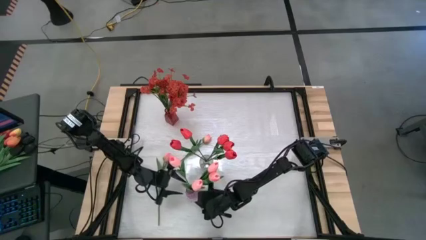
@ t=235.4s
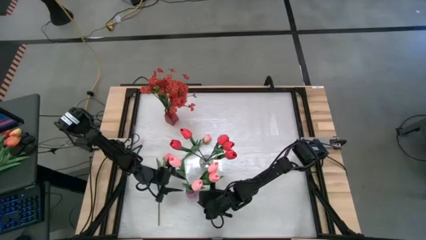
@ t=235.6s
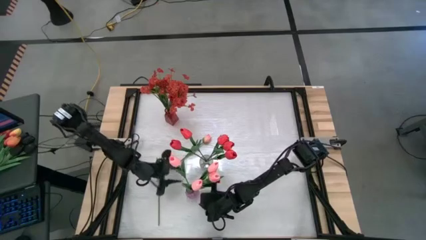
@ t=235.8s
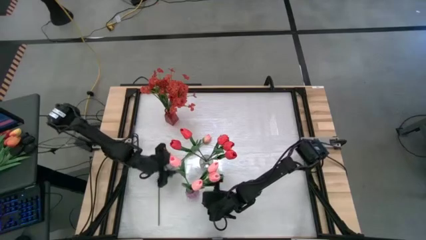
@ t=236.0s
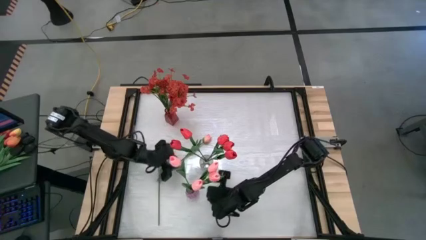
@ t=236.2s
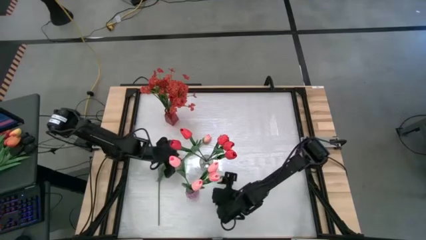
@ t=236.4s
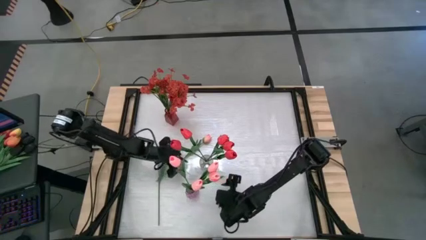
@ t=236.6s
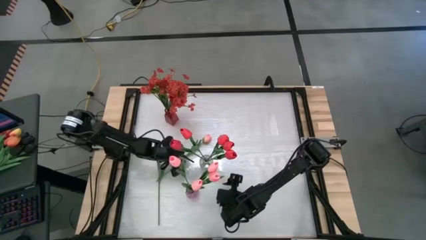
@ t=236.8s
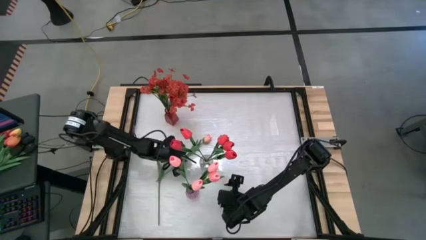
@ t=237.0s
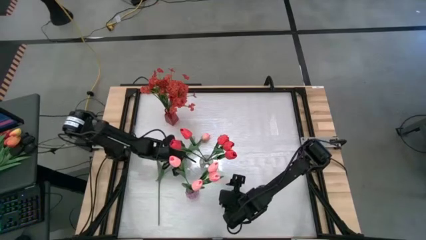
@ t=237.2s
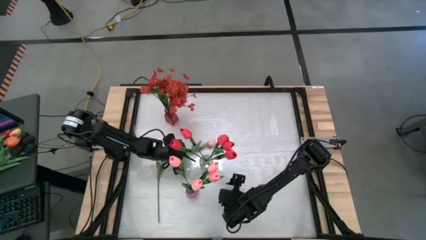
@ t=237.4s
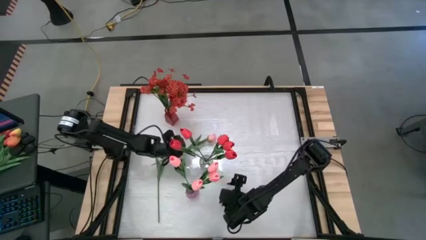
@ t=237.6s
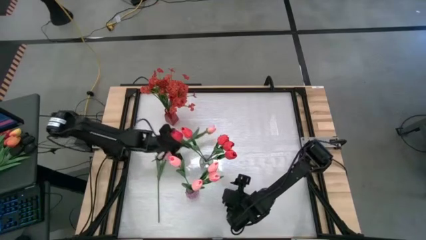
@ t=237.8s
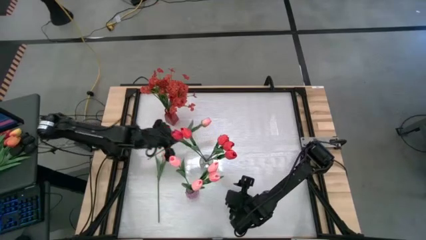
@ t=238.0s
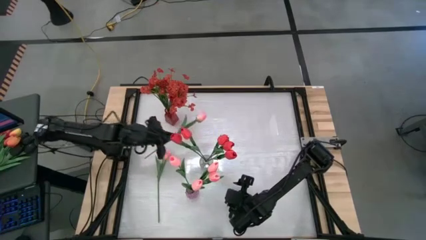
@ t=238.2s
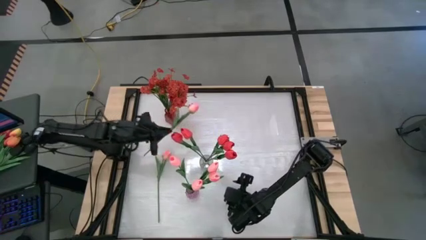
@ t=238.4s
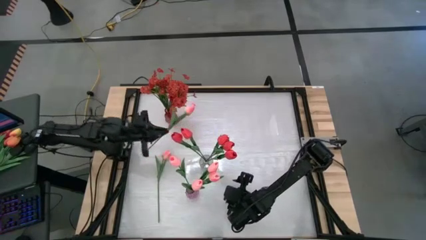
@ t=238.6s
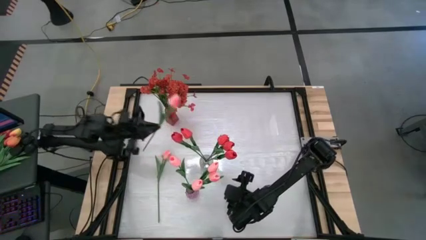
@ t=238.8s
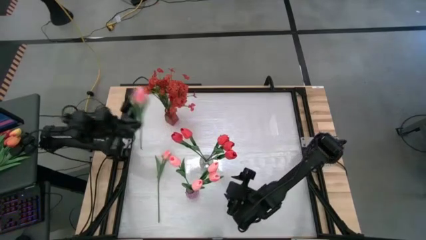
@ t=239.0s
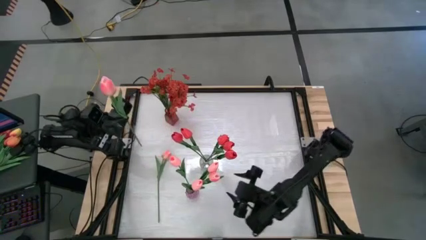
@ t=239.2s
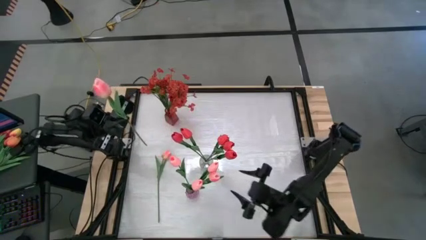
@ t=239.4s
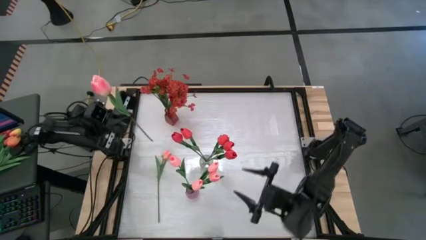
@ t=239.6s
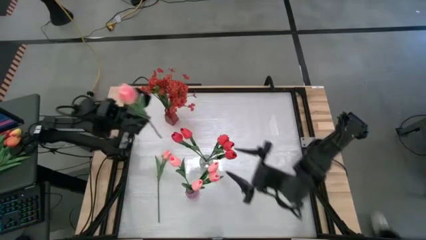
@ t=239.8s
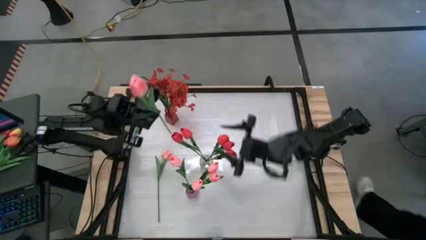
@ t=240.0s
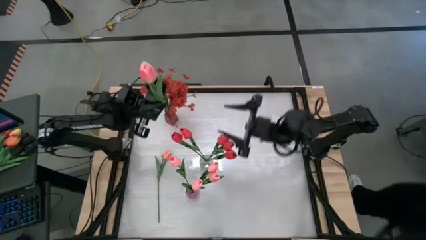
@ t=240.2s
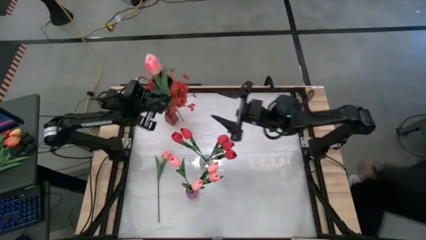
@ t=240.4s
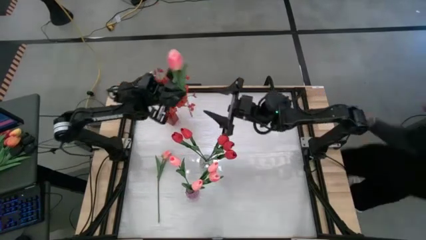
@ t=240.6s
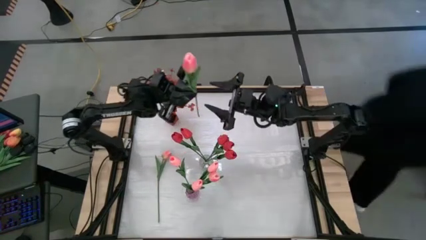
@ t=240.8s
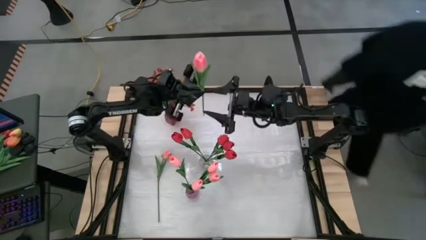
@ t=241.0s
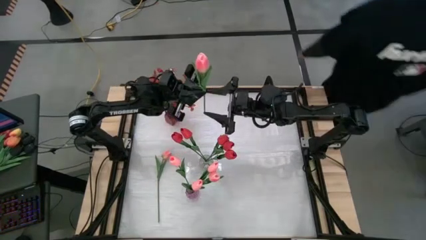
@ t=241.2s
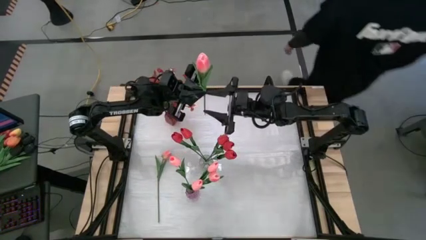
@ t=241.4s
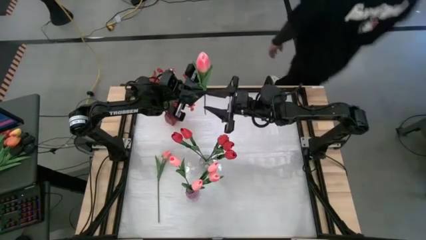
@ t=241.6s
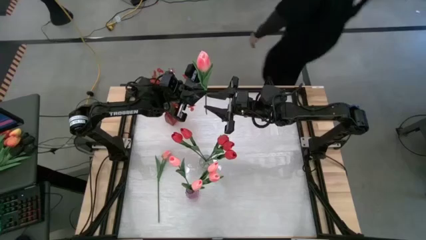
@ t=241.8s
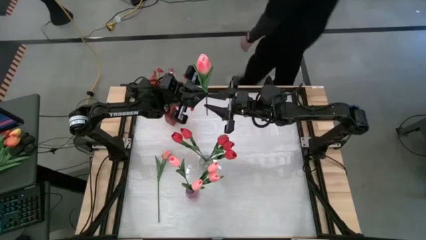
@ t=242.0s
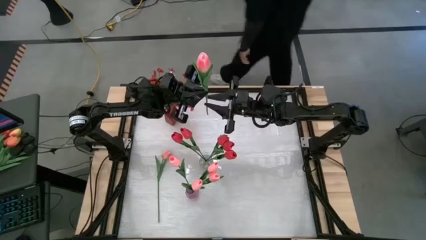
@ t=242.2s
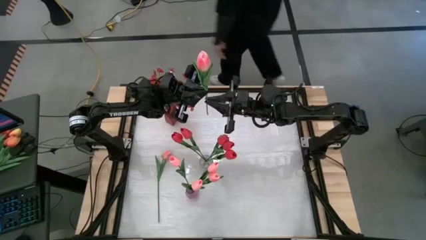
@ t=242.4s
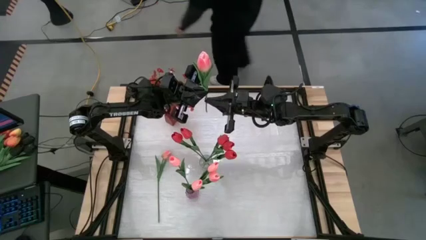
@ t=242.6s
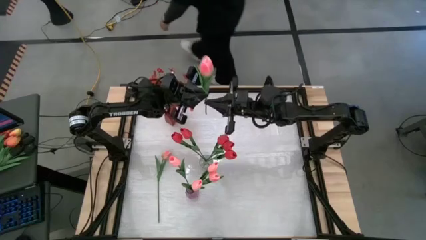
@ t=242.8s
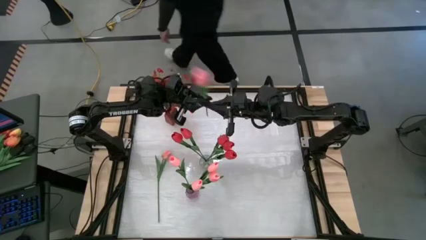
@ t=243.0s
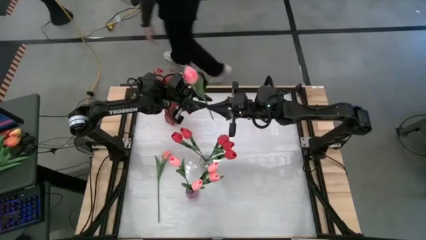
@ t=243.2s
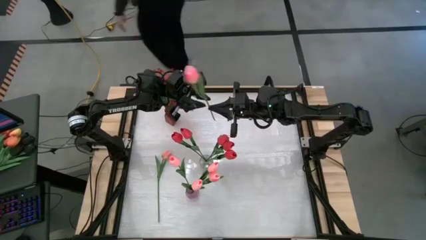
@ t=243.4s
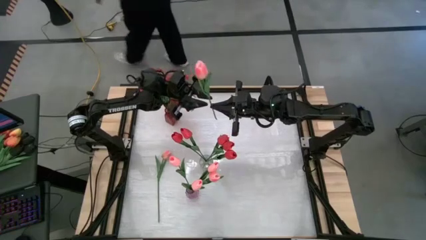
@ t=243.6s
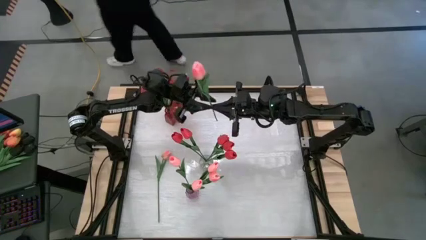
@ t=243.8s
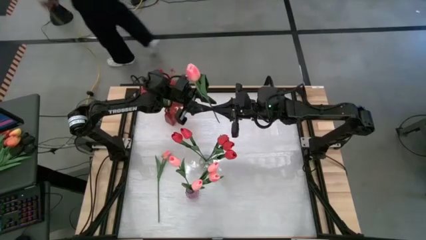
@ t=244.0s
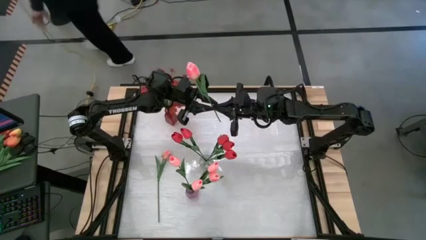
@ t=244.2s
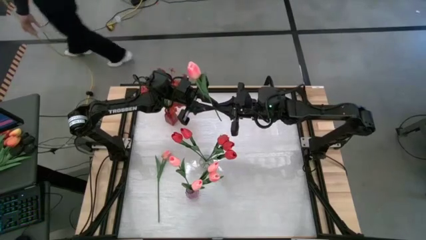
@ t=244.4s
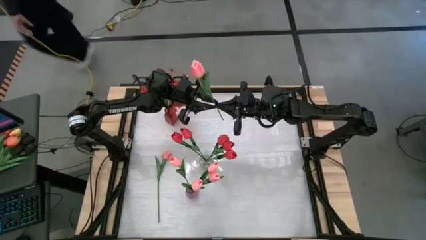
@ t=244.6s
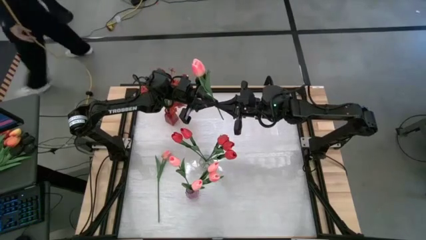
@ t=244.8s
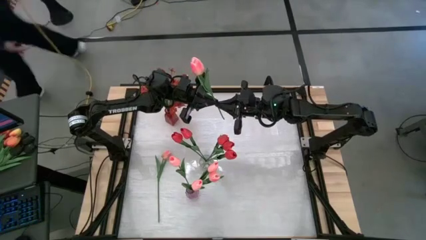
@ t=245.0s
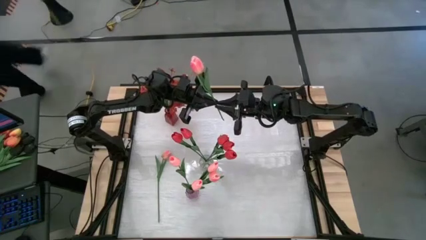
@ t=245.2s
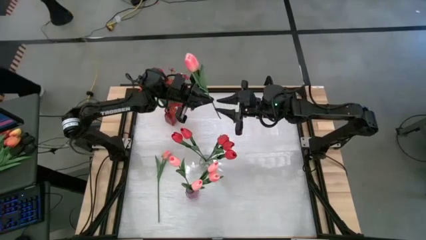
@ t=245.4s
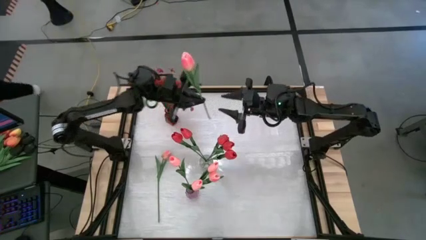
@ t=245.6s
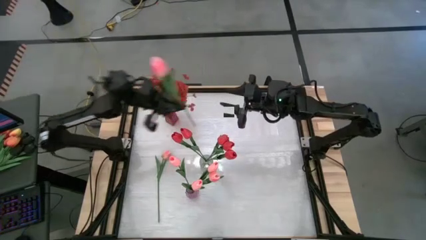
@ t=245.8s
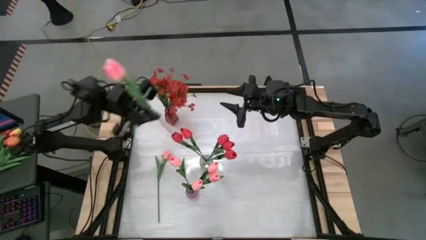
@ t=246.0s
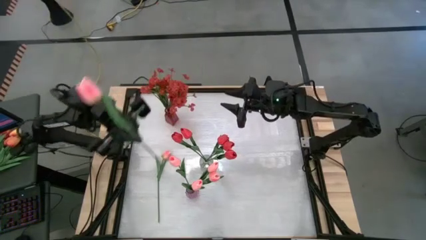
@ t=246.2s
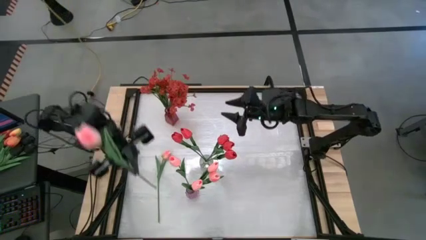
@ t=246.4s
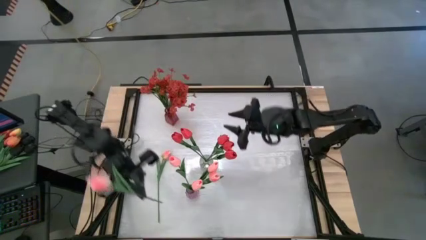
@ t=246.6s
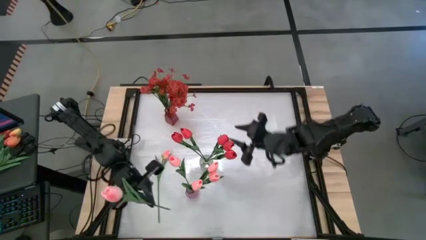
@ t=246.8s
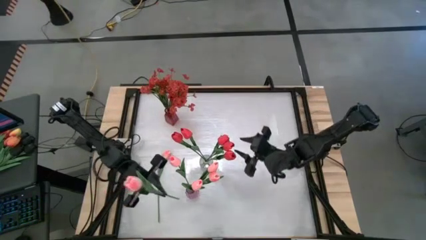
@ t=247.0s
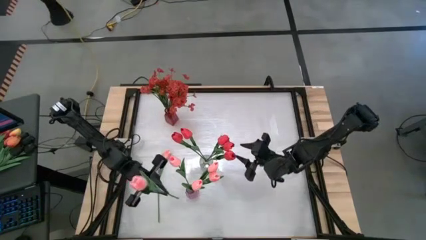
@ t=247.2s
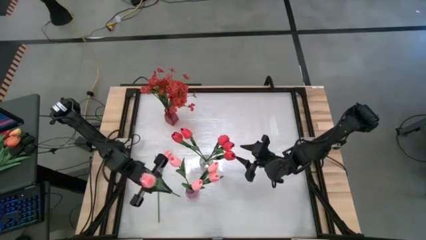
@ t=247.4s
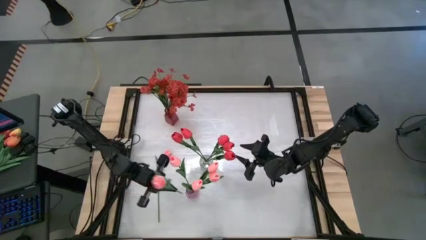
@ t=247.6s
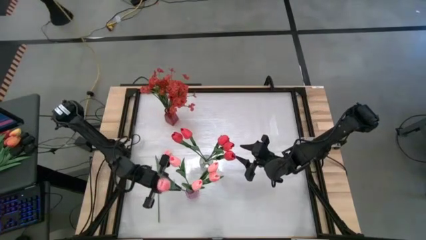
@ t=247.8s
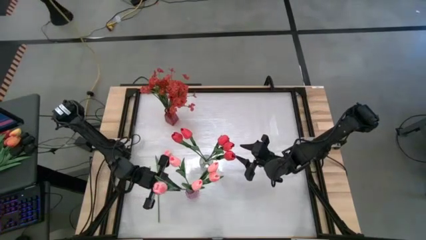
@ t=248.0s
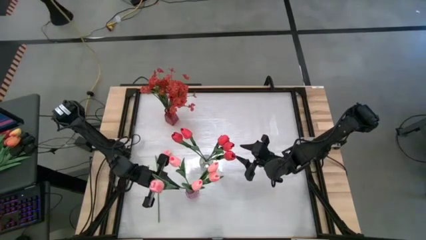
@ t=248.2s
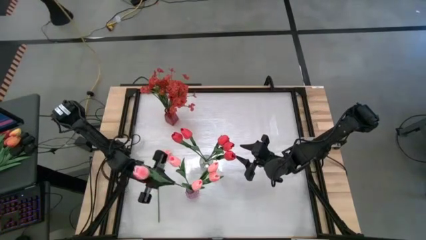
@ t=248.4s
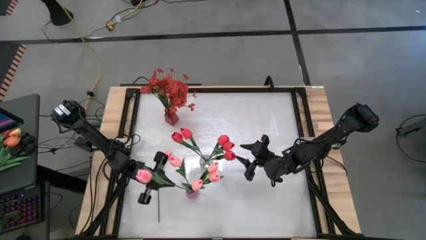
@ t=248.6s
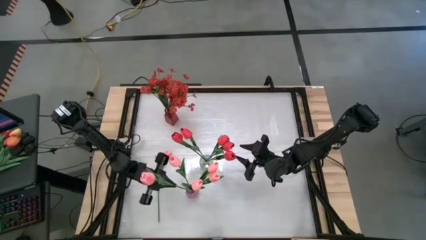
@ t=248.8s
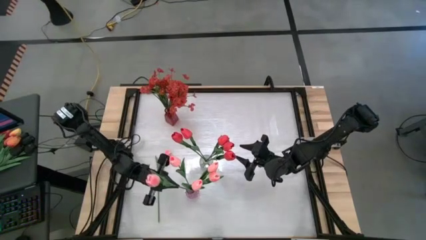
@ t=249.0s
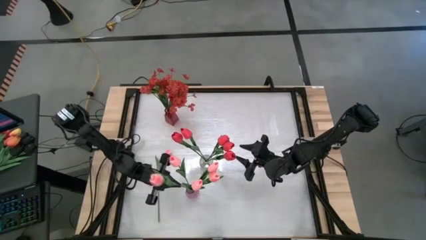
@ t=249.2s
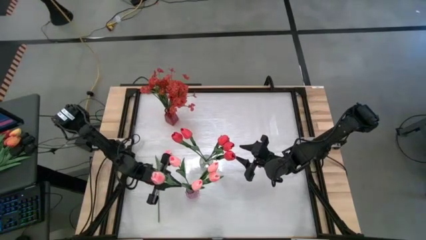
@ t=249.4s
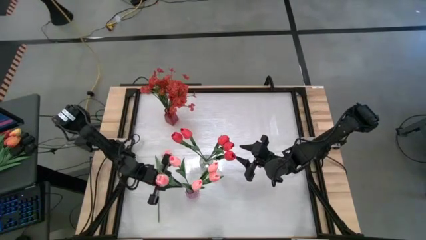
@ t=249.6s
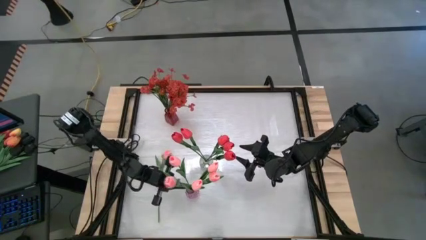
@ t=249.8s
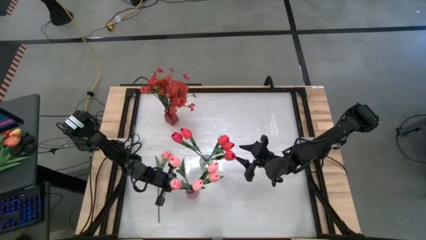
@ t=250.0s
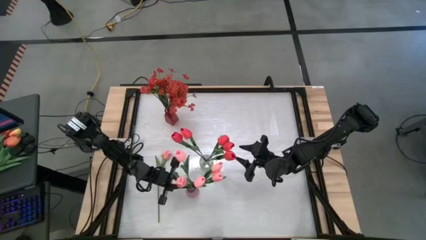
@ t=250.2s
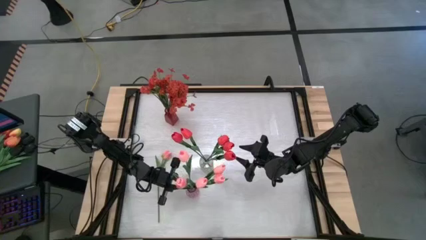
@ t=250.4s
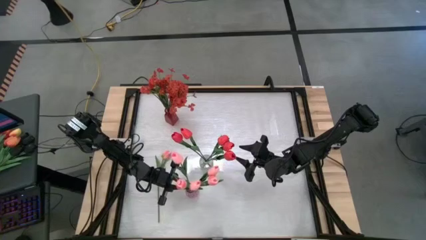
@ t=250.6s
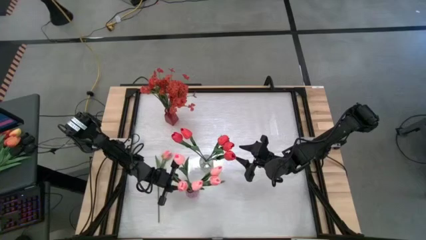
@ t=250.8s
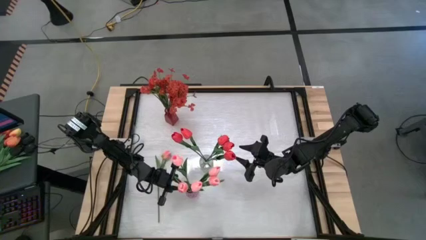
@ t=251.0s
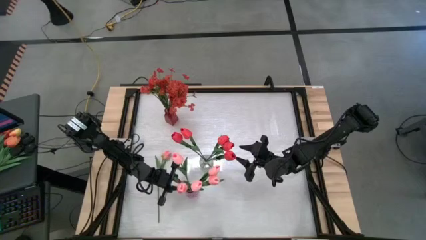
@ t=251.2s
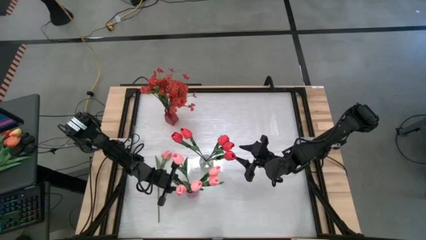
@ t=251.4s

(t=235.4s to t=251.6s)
Task: Sort flowers into vase by color
Put the pink flower into the purple vase
